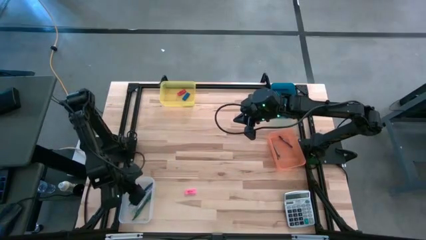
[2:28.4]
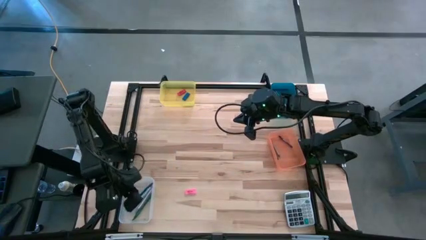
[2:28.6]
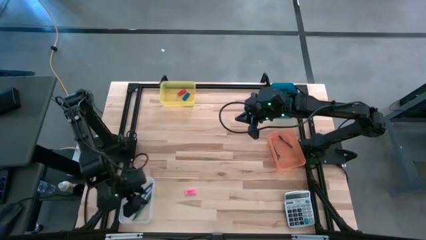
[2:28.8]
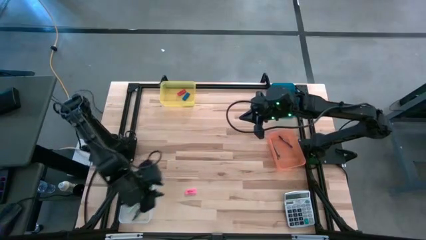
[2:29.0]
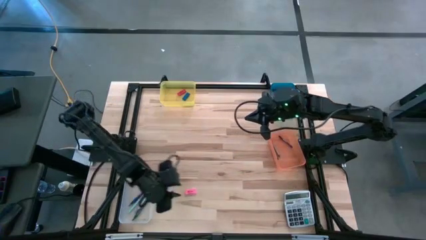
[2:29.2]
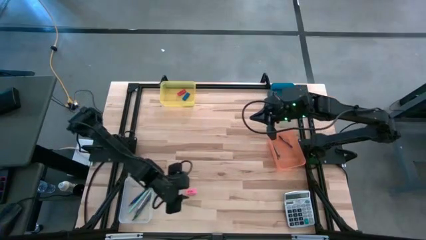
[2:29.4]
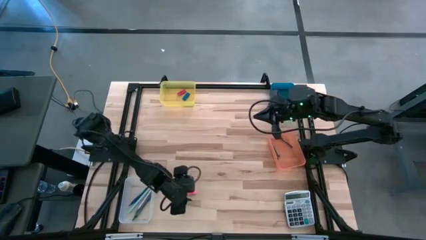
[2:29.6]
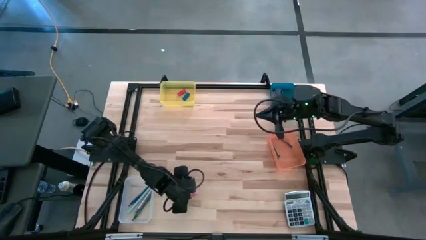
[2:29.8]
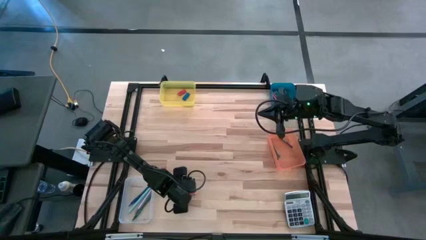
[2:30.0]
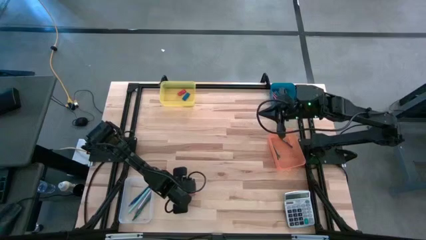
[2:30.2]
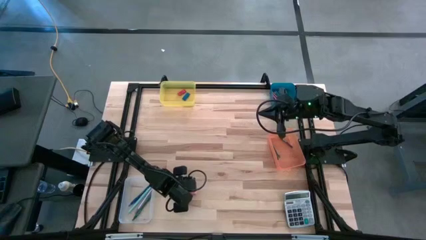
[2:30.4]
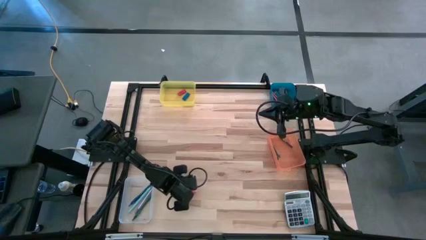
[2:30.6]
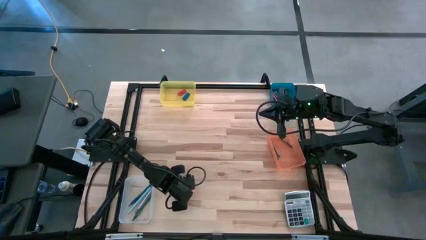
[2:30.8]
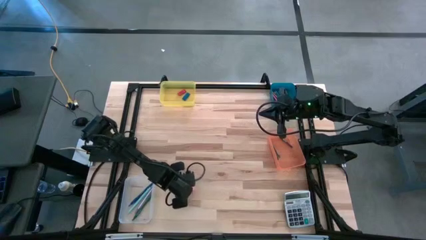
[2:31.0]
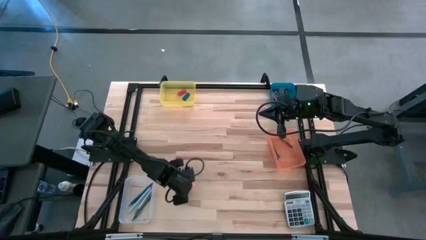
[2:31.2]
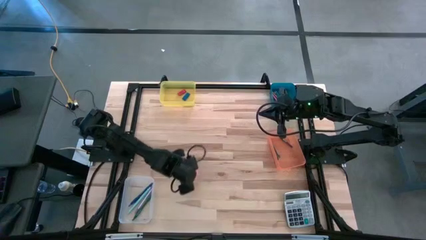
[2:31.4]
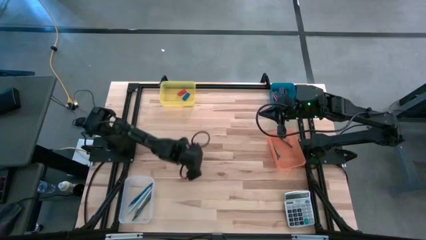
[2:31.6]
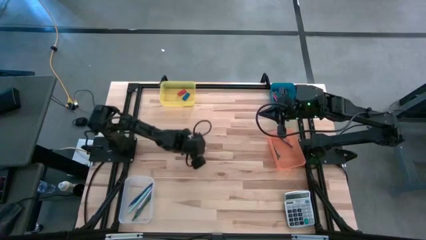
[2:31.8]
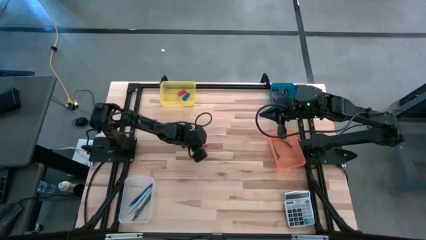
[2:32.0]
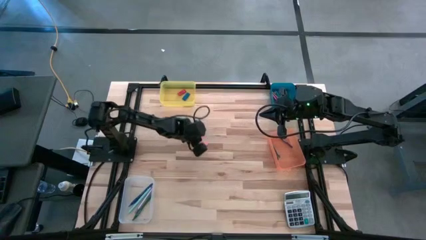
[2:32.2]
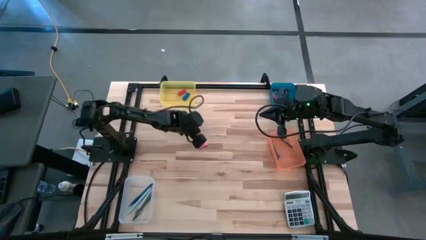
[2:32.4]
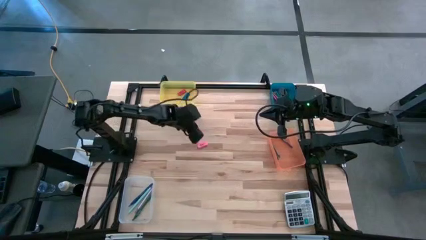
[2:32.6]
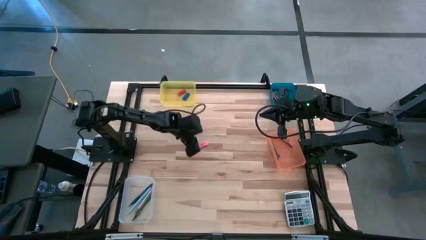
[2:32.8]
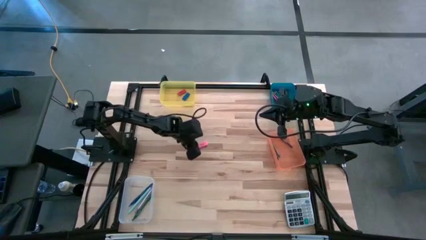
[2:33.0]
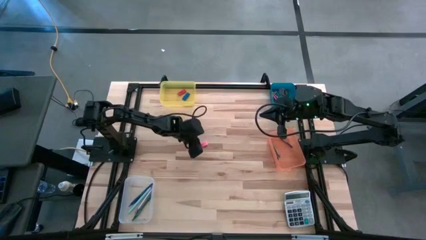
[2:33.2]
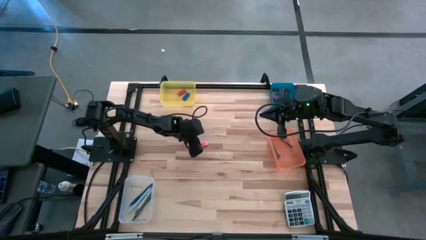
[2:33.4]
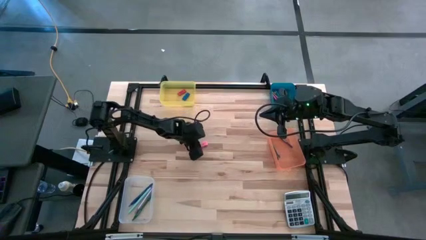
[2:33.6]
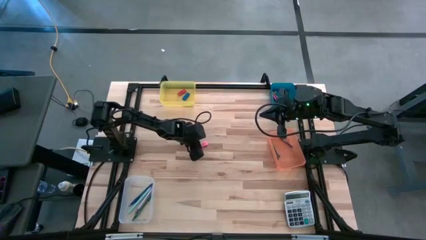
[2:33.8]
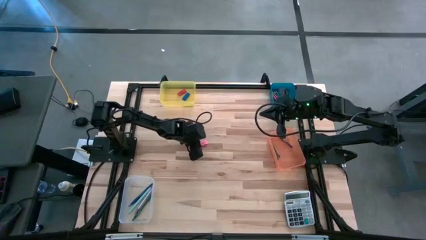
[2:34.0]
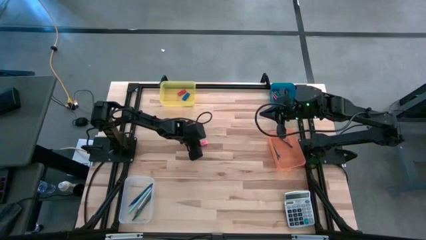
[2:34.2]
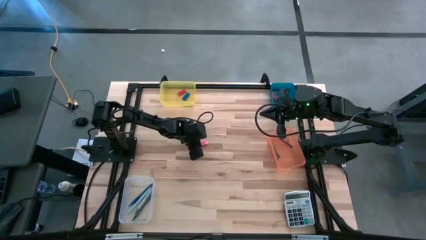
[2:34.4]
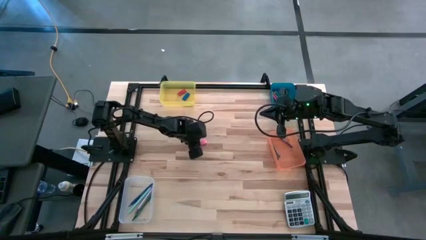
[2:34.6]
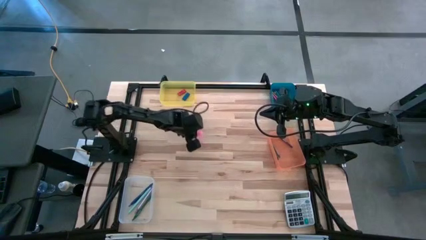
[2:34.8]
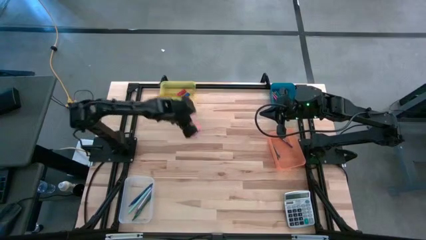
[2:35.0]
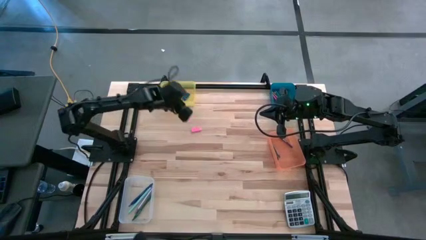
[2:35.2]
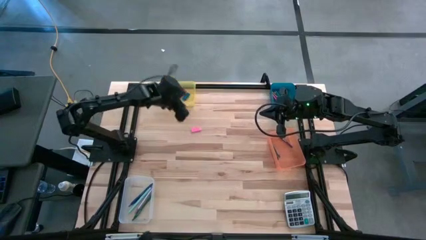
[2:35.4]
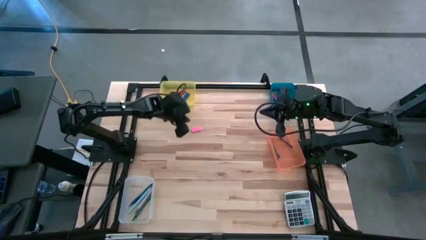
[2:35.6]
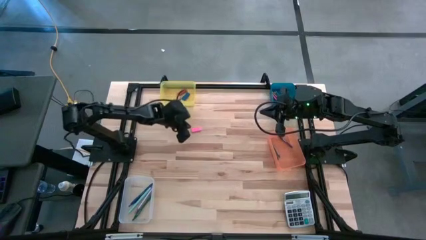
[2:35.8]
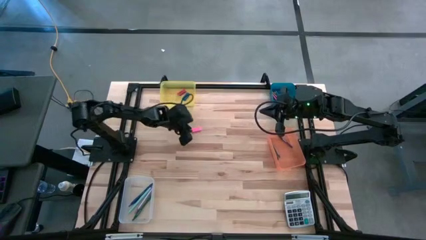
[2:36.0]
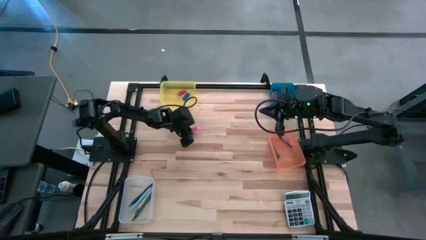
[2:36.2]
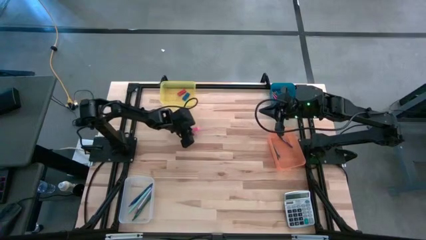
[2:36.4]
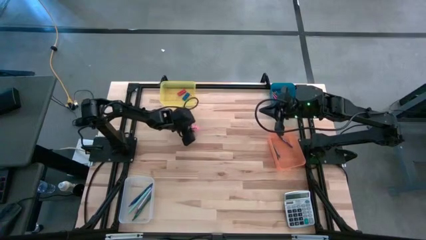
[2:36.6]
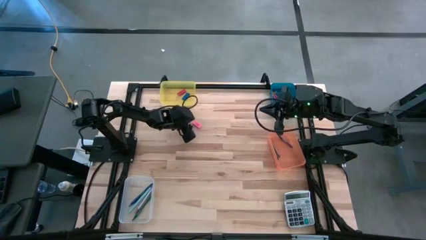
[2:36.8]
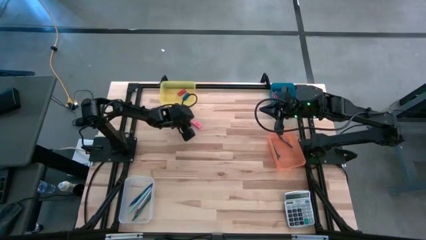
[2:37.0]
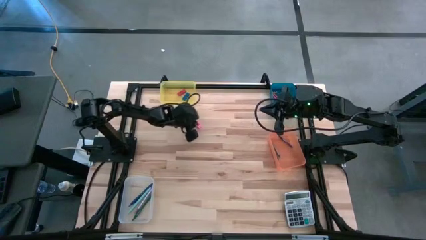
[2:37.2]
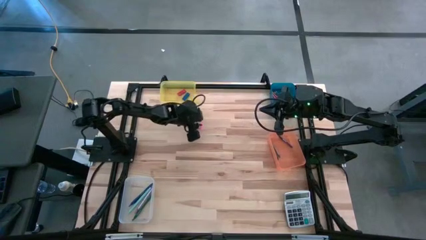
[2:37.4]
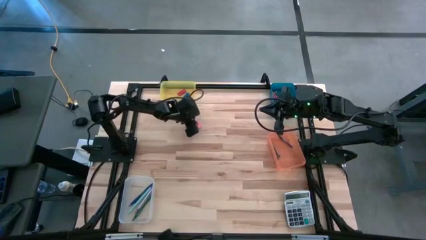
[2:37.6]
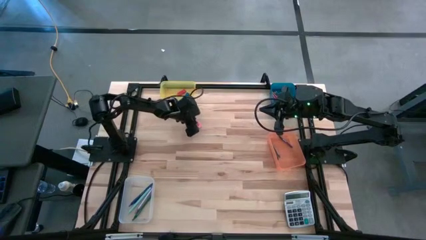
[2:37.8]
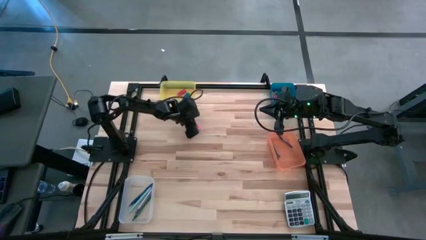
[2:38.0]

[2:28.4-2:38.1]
Task: Sort crayons/erasers/pens/pencils in bins
Put the pink eraser into the yellow bin

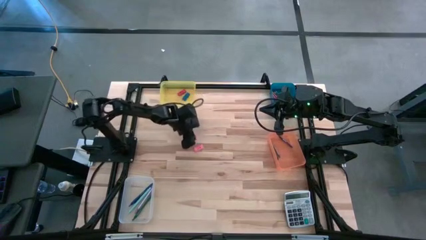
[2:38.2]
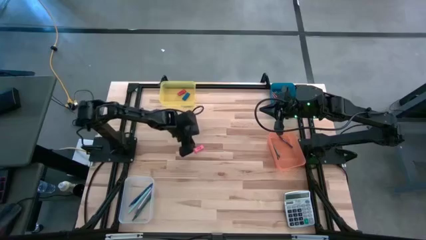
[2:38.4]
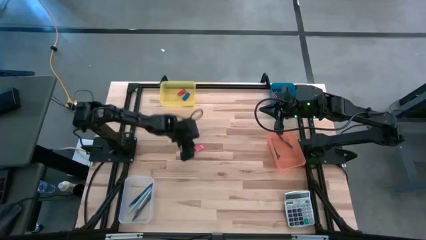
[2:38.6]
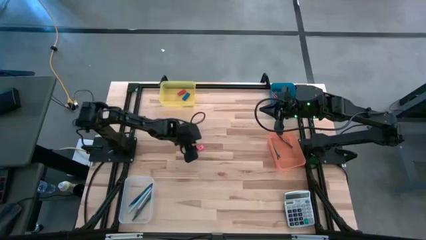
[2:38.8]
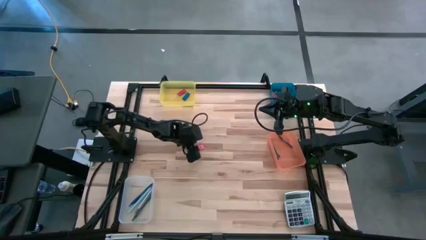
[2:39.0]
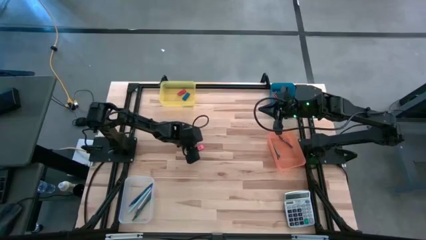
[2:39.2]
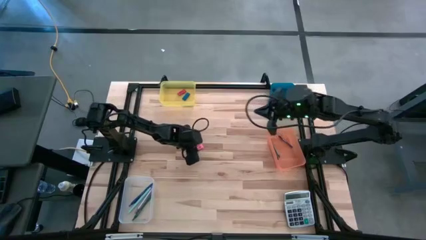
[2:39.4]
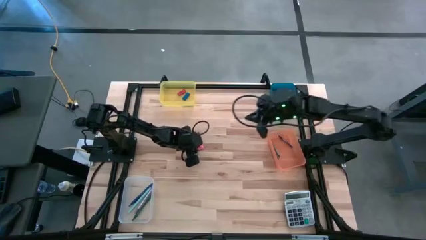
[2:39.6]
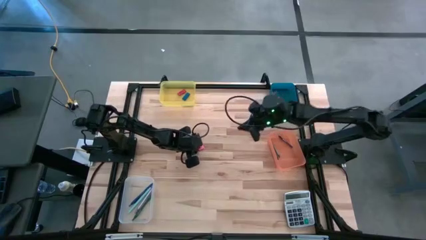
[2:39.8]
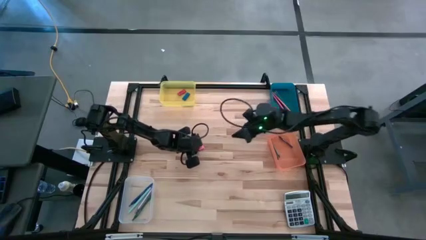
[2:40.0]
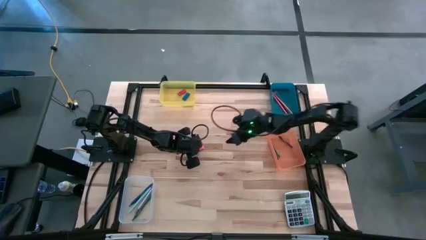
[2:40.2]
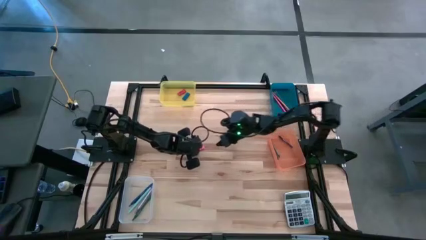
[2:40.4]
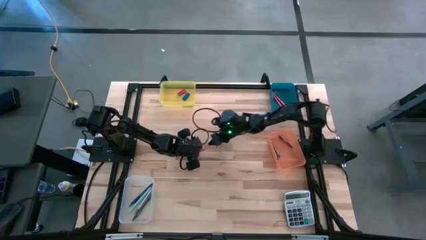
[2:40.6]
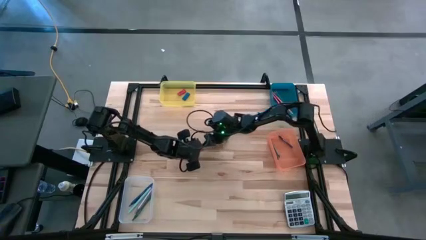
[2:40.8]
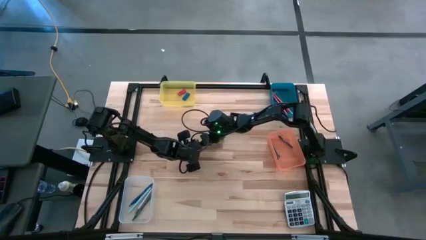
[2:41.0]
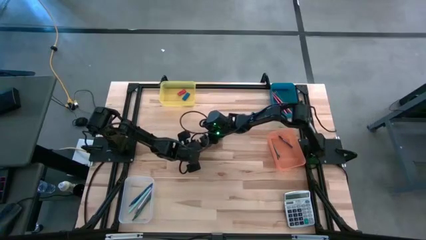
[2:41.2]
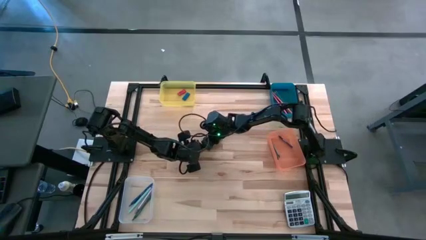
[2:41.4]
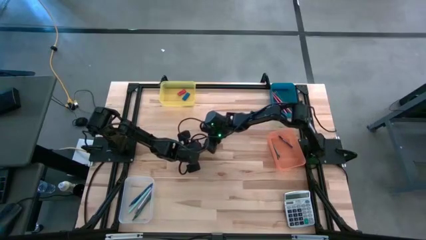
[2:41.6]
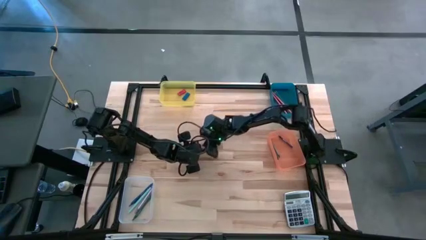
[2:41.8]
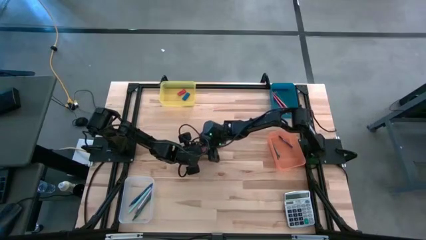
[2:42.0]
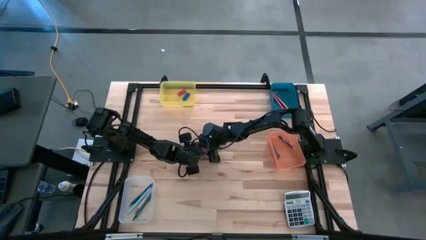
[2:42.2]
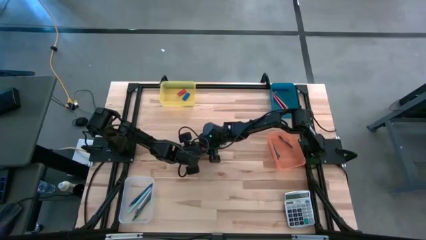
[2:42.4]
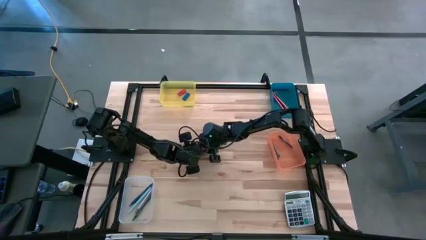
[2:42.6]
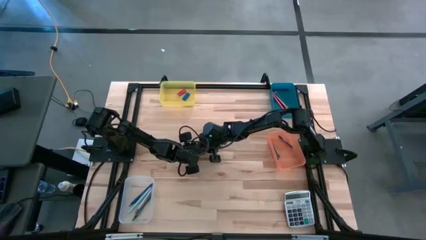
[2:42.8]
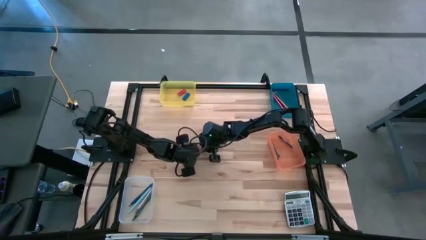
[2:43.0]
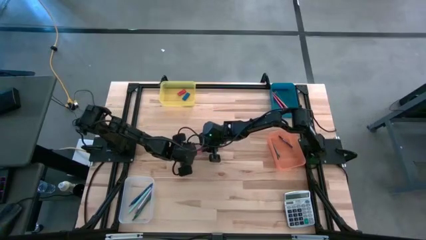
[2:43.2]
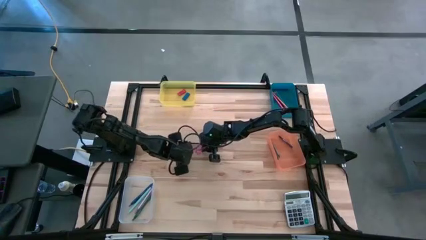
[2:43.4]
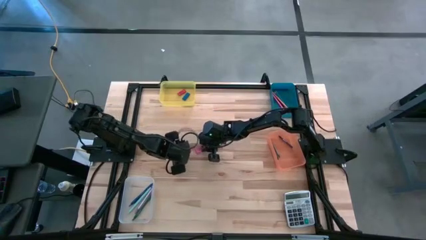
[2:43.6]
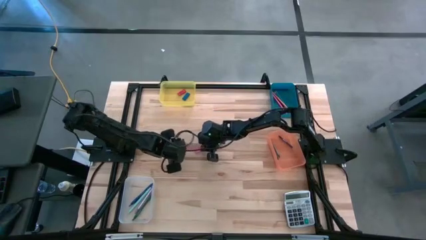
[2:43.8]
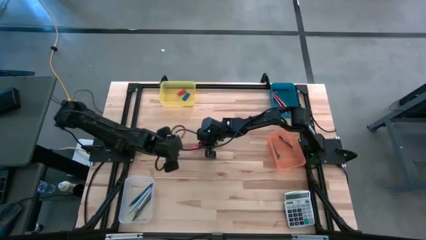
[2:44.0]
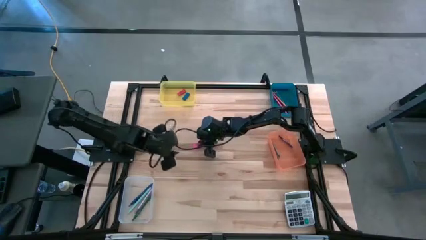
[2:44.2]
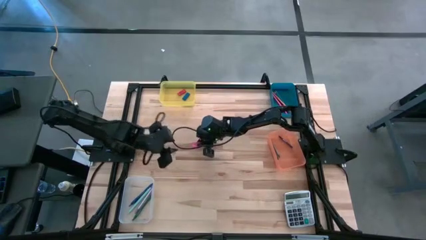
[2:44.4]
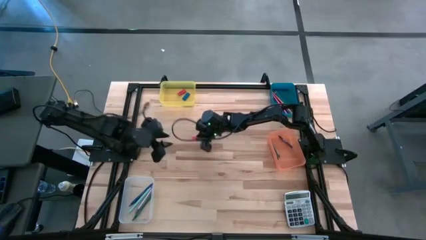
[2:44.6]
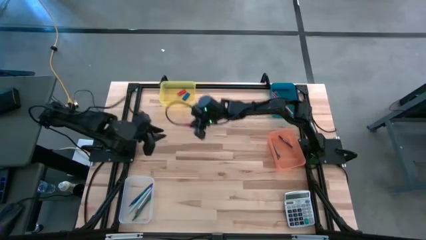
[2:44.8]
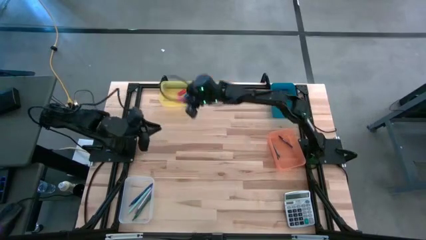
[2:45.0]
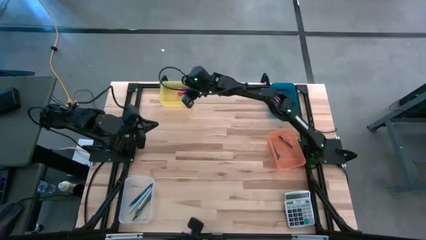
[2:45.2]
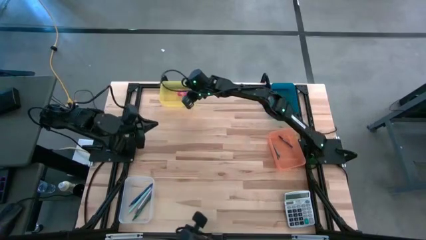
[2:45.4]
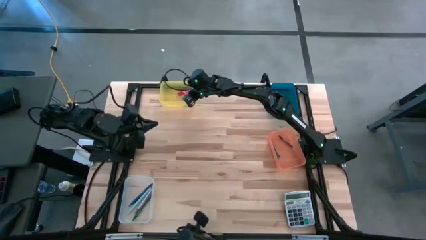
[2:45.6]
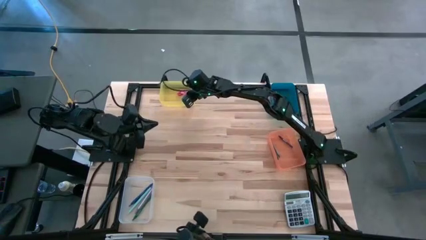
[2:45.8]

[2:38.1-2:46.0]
Put the pink eraser into the yellow bin
